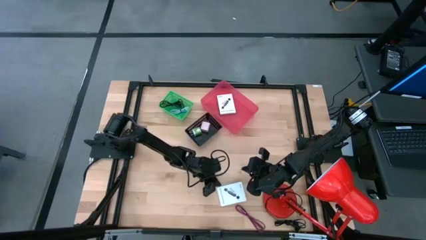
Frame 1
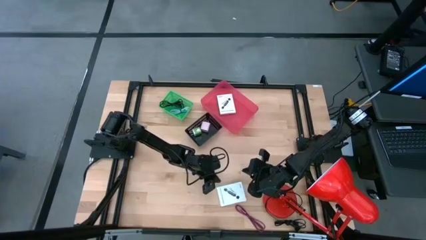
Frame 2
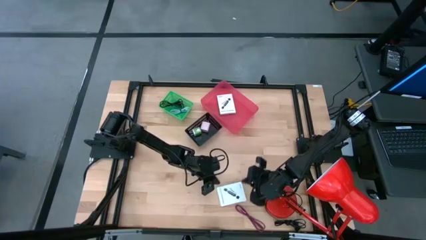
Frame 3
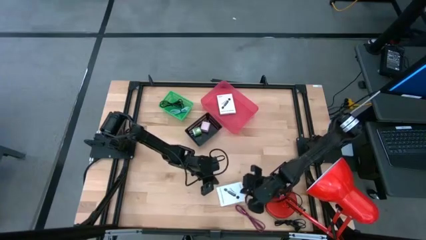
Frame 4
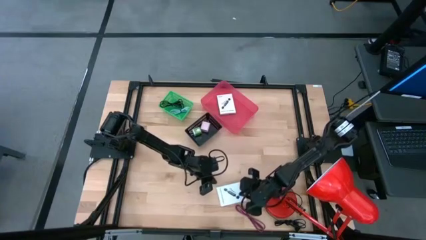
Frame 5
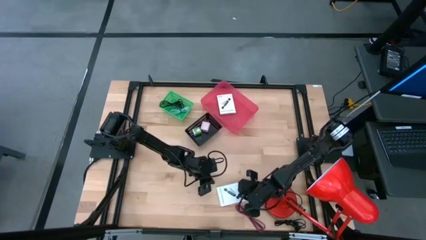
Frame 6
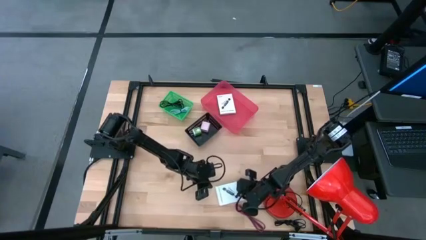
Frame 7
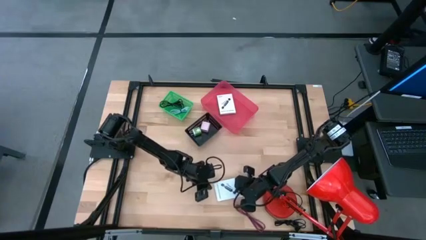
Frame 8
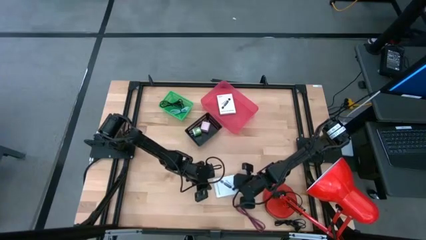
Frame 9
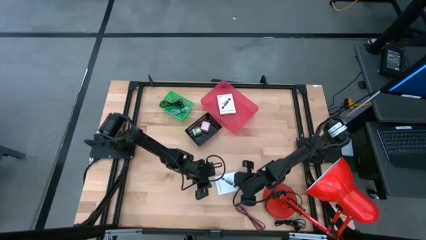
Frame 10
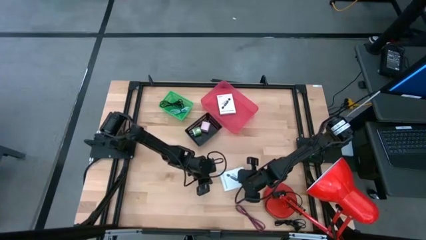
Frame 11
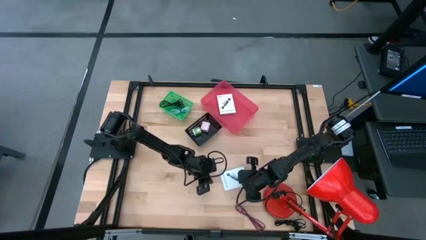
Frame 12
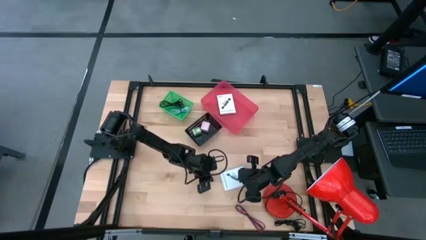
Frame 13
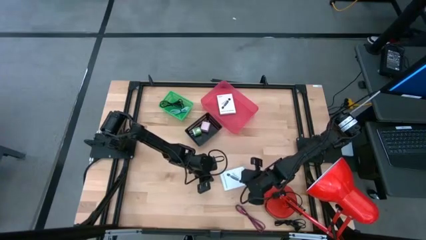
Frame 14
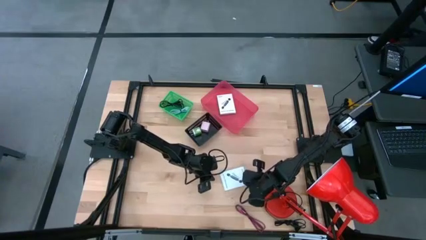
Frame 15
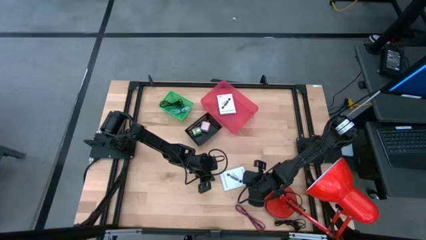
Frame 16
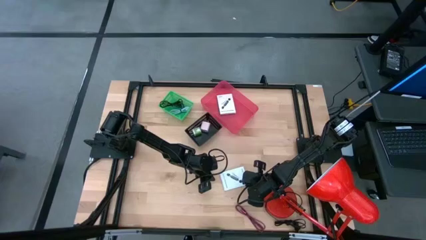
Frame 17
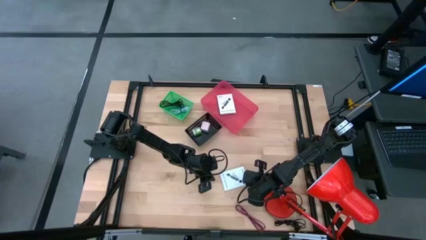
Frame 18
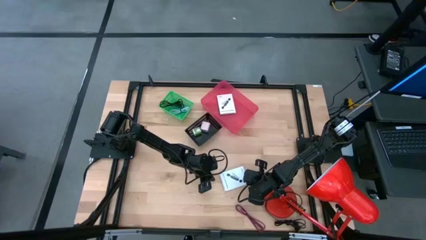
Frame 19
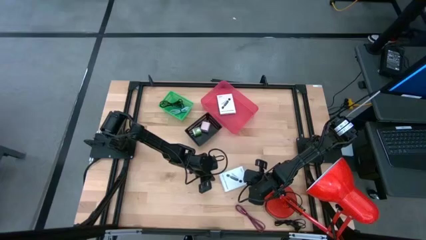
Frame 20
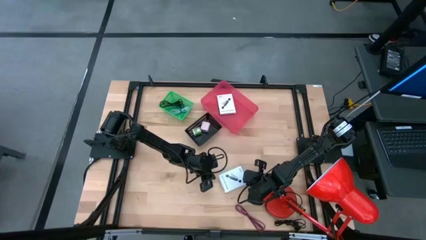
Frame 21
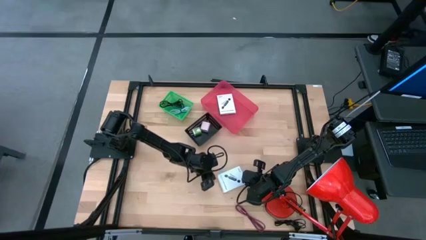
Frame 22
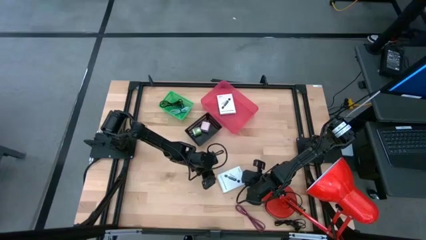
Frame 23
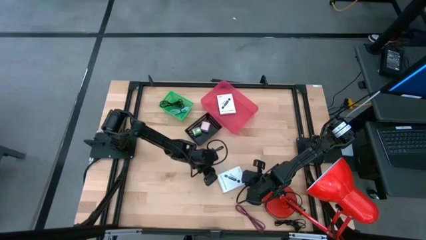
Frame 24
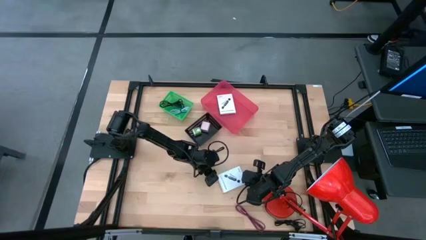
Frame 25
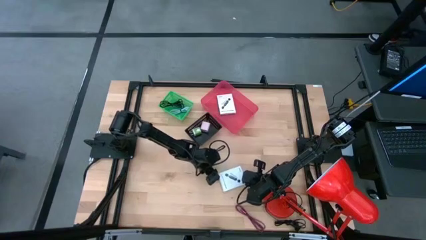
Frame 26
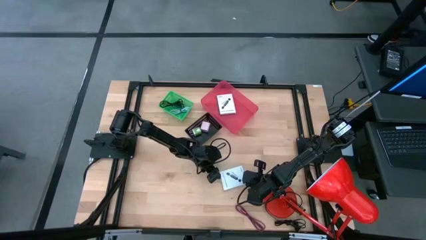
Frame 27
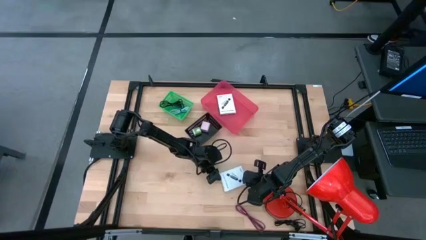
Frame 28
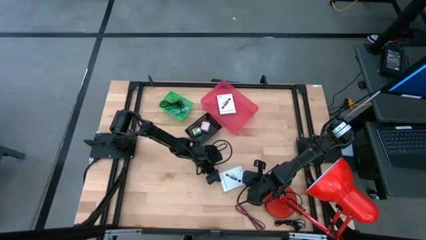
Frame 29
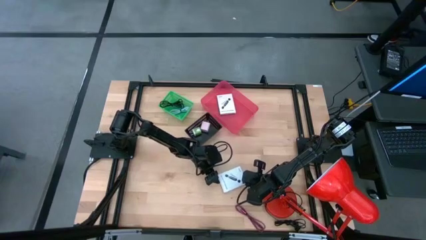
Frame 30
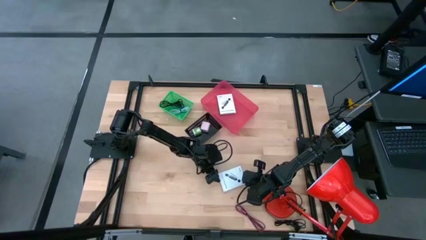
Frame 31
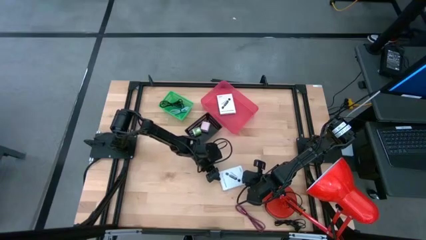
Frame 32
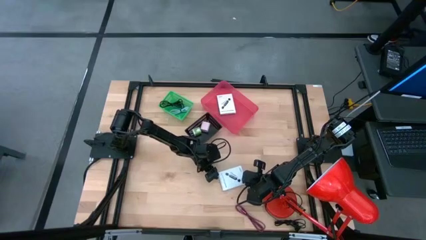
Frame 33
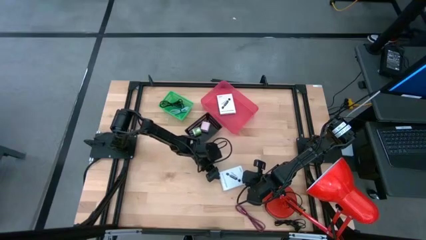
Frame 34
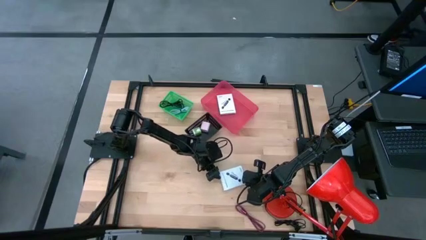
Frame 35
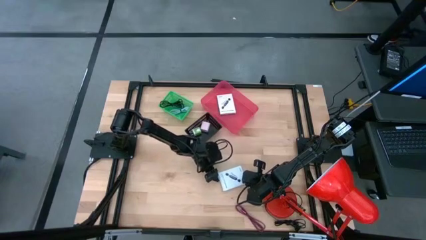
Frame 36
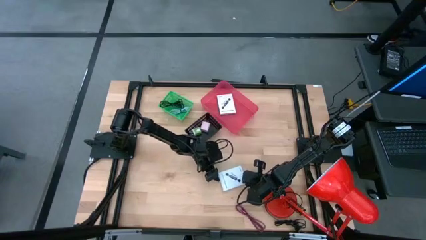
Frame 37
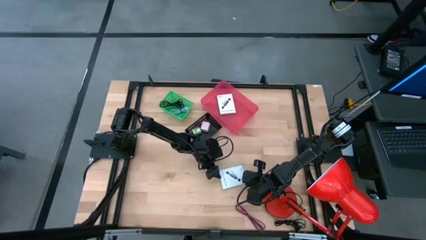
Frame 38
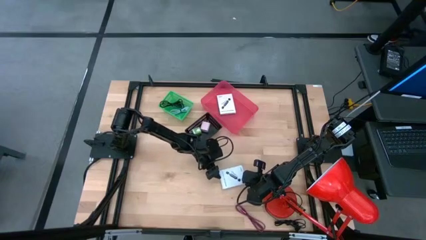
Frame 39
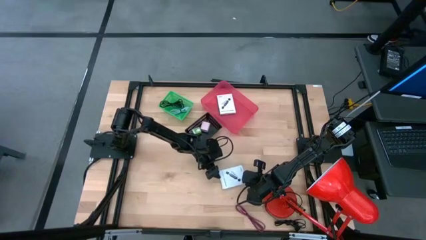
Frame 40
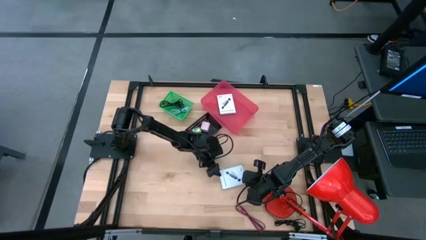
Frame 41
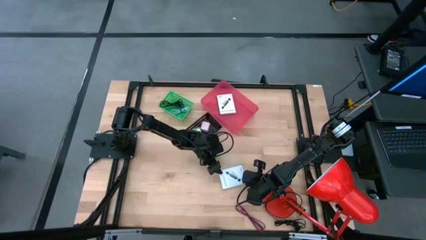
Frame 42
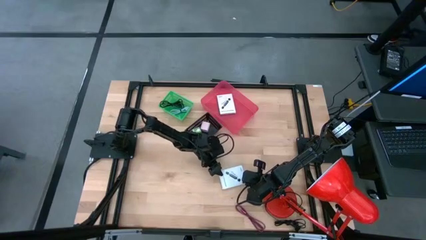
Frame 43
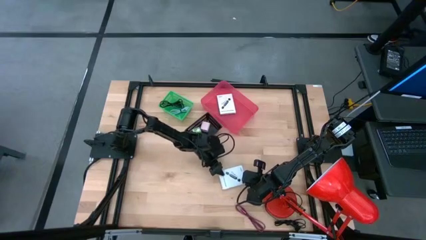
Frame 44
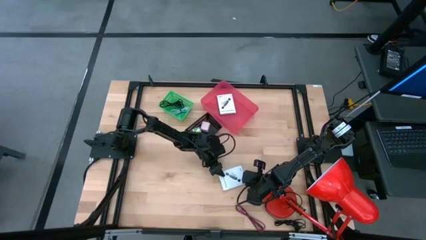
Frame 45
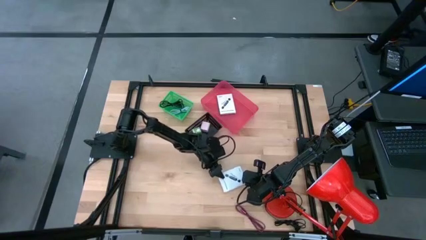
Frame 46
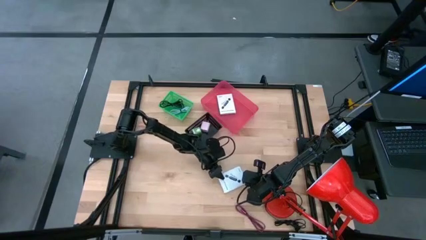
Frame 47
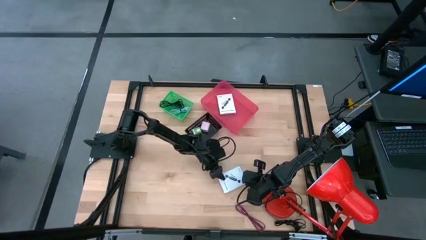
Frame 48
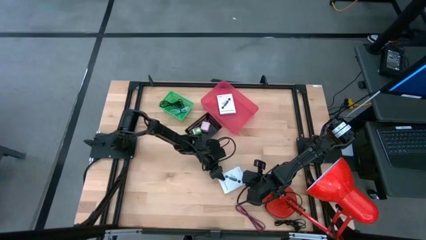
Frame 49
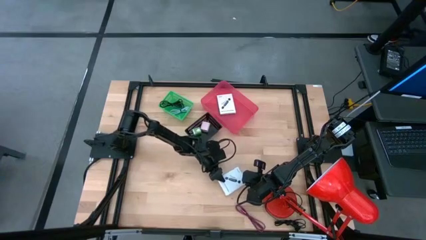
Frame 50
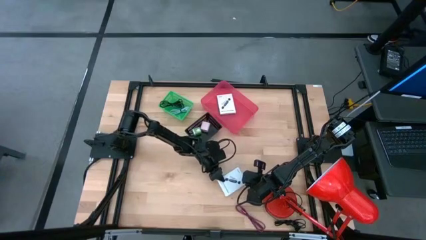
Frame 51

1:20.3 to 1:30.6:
Task: Pick and place items into bin
Put the white card reader box into the red bin

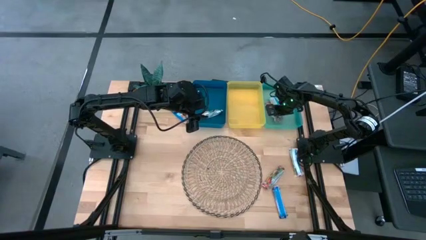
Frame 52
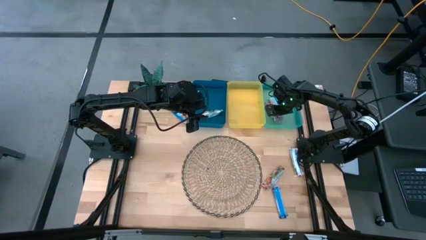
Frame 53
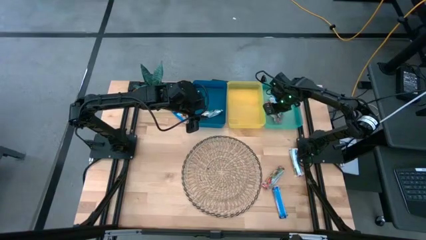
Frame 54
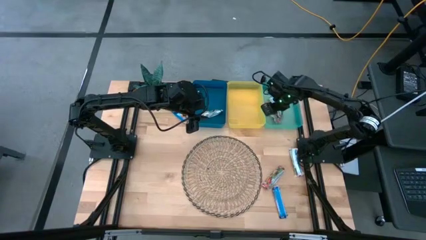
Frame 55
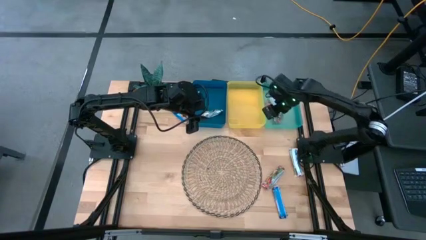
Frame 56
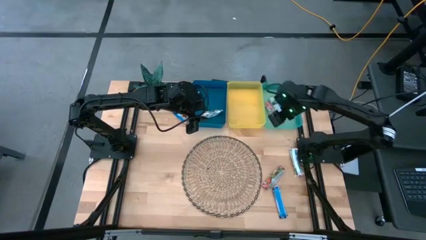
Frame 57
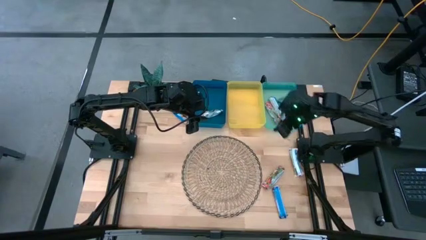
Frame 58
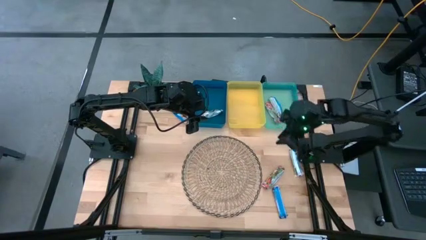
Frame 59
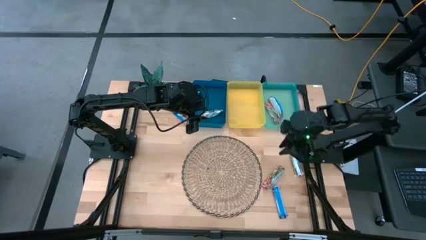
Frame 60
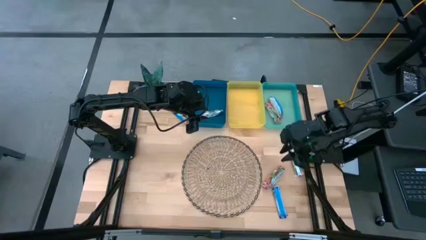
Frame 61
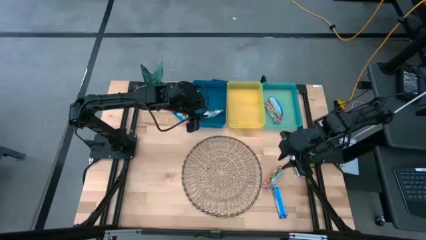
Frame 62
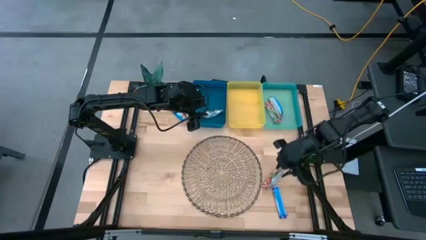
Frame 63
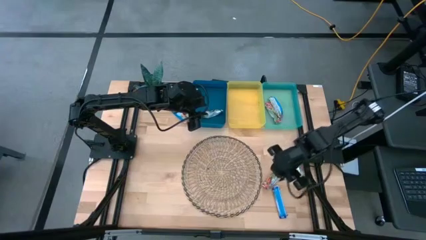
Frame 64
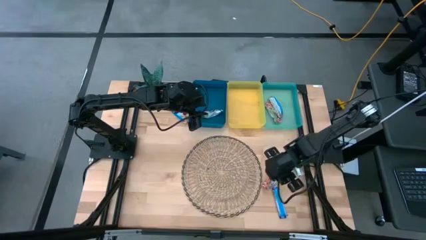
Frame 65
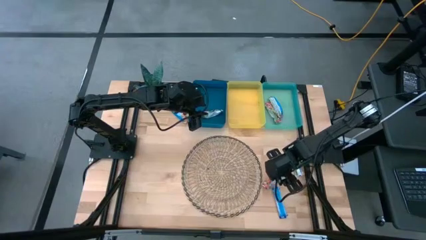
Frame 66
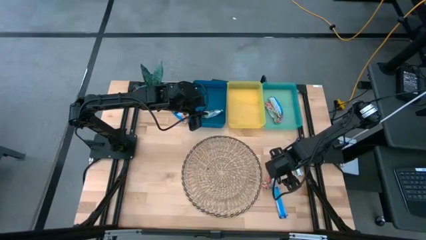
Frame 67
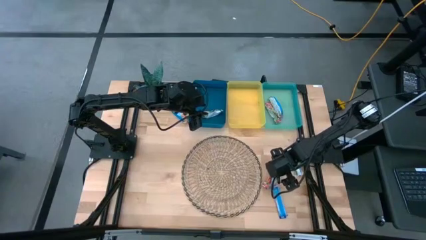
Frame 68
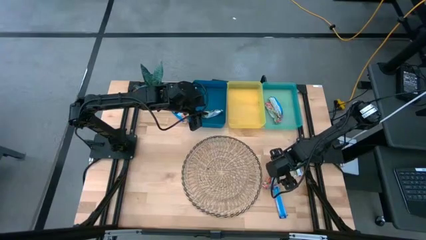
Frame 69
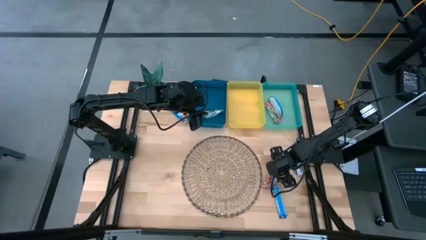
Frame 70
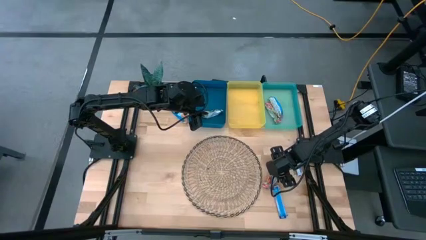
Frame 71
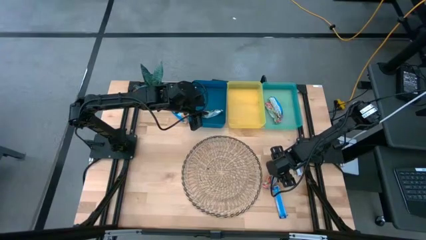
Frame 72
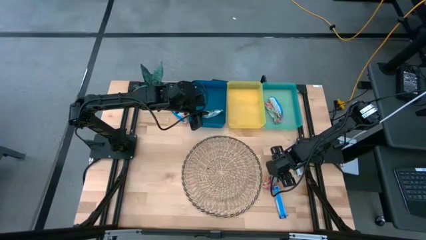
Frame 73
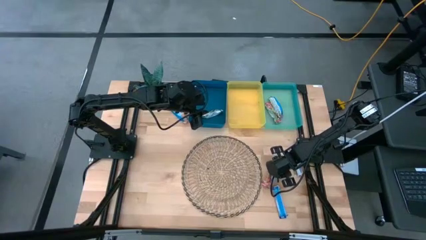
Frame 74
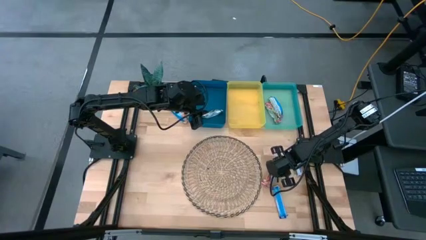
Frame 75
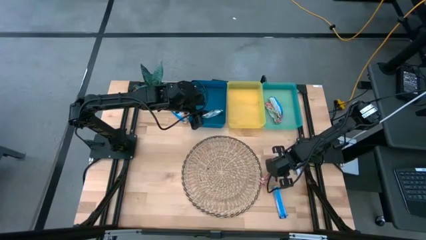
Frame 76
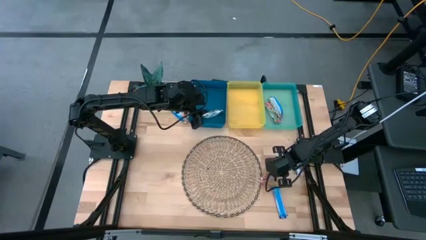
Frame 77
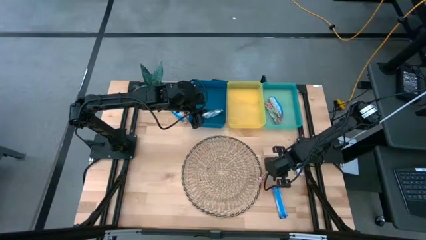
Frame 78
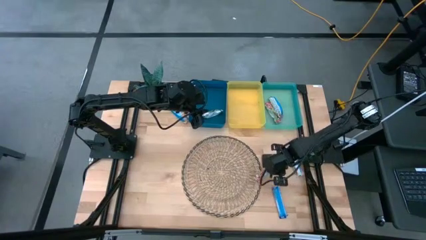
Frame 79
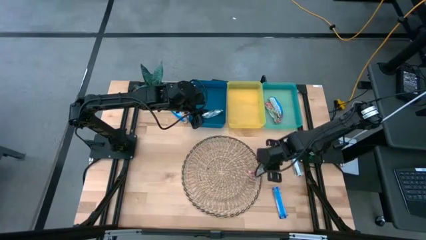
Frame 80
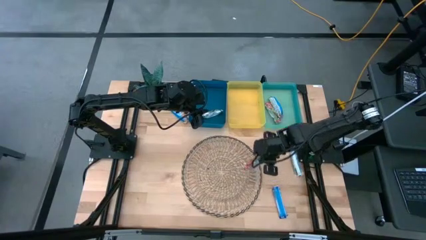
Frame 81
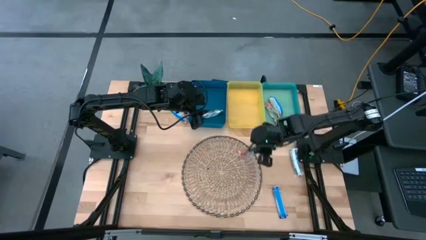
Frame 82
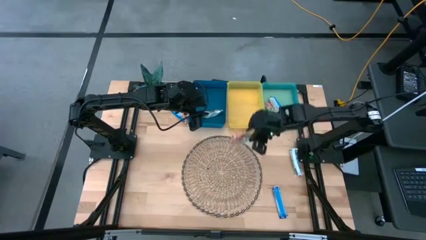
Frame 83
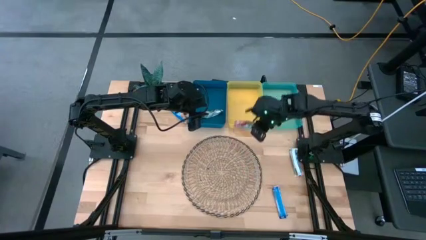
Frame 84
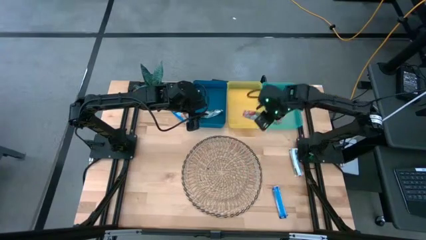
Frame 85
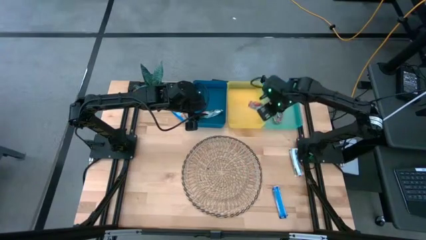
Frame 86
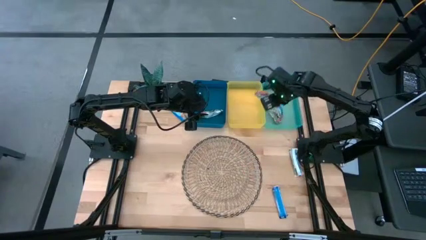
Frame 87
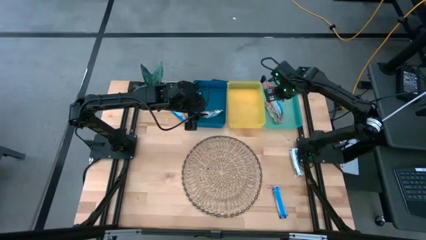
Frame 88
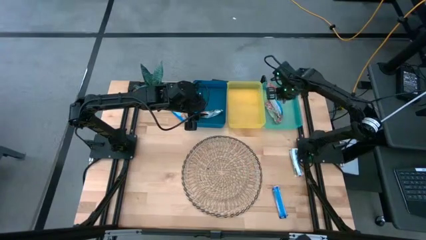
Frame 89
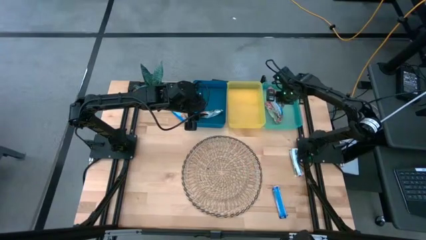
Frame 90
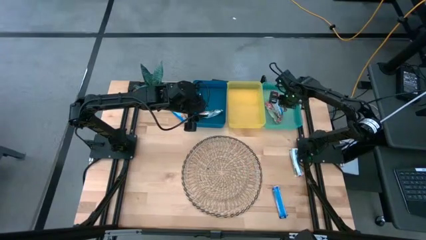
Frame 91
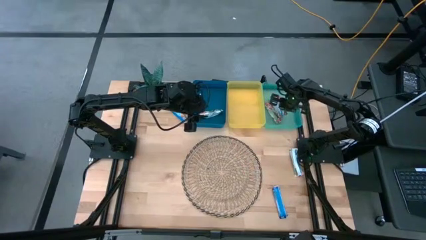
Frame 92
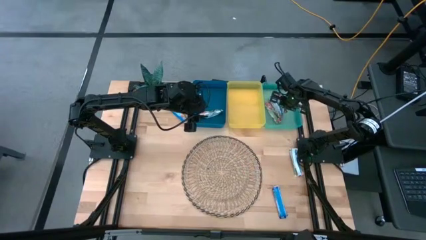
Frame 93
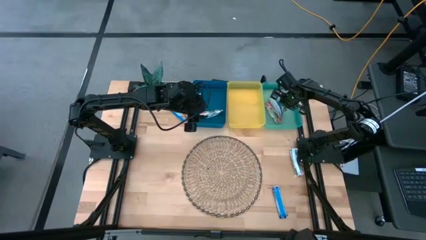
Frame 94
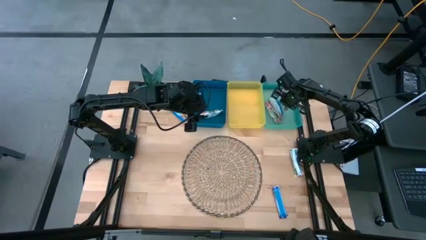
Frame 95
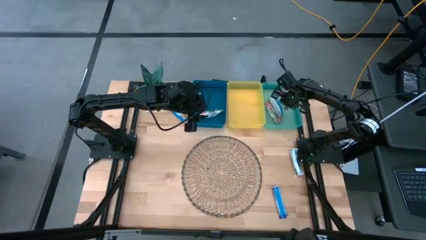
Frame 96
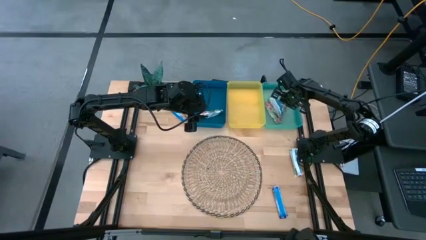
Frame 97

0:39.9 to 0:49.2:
Task: Pick and place Granola Bars by type
Put the red granola bar into the green bin
